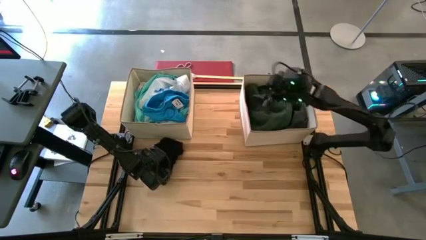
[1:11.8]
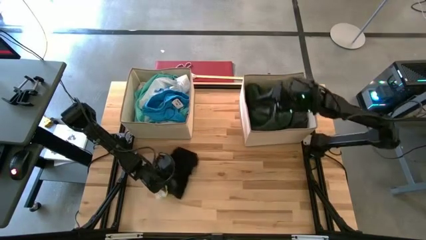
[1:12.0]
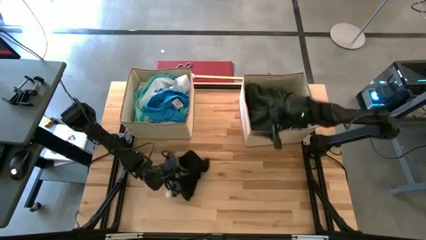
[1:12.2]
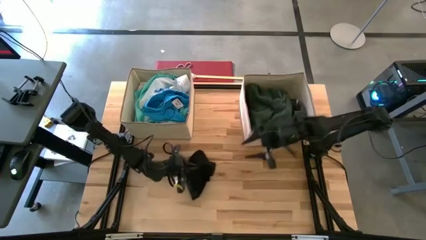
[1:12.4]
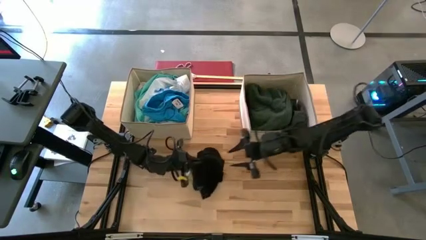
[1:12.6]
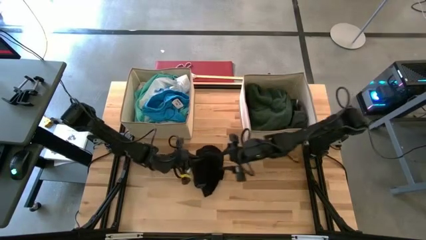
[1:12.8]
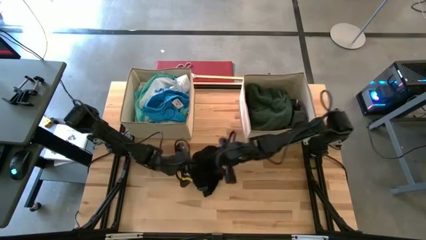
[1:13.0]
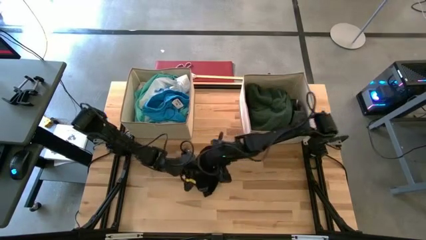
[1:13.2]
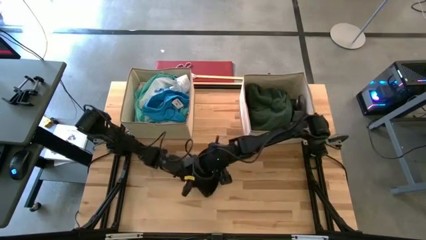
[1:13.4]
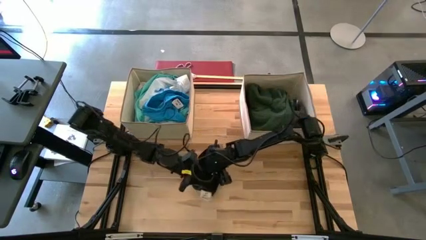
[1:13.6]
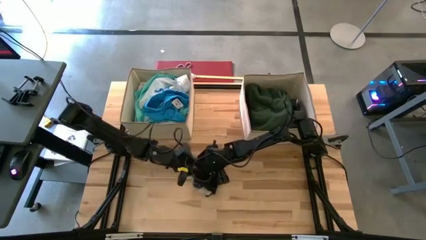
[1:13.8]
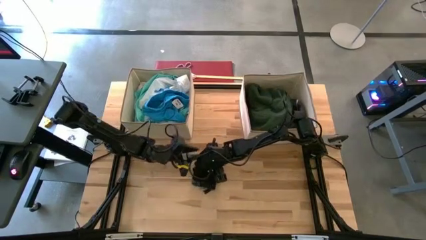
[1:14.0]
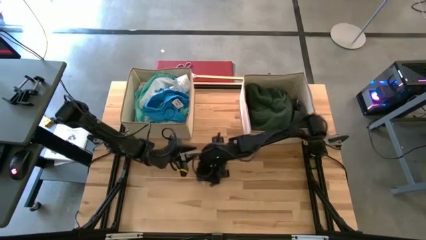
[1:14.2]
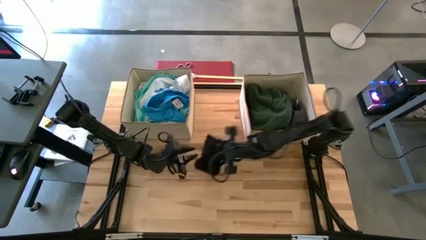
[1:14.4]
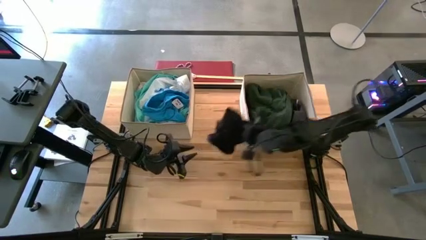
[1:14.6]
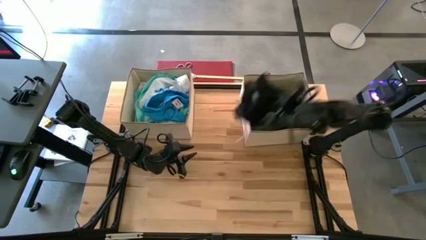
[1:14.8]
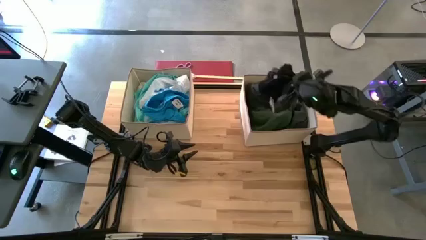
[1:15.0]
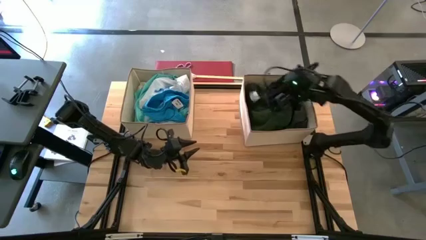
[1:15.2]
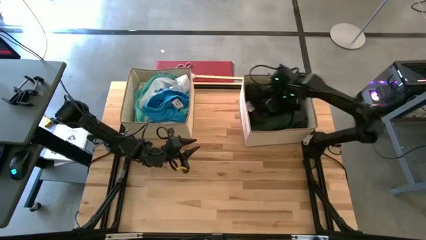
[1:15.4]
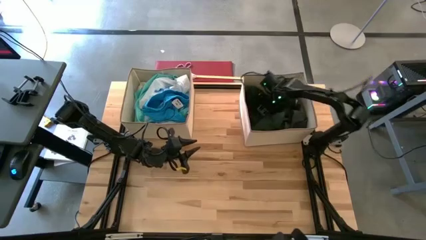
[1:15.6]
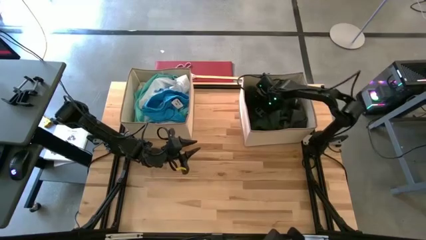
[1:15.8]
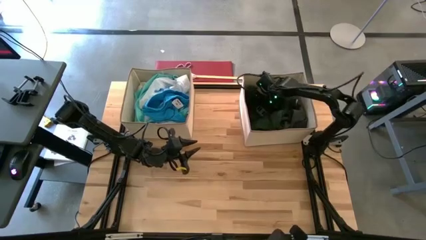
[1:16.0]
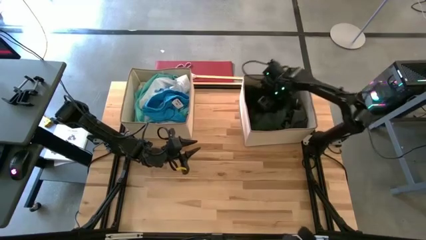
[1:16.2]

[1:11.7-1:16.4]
Task: Sort clothes
Put the black boxer into the right laundry organizer

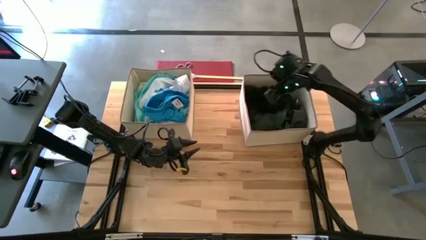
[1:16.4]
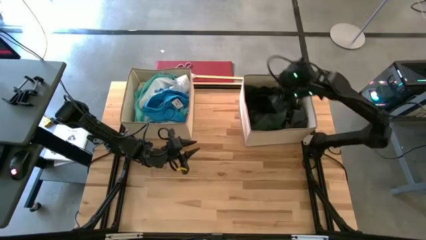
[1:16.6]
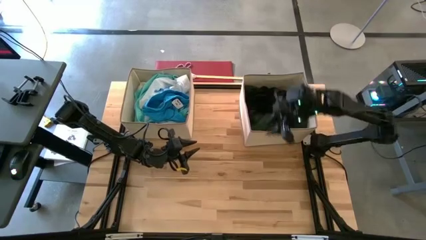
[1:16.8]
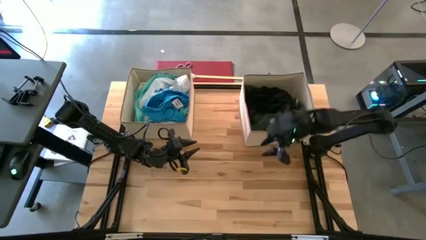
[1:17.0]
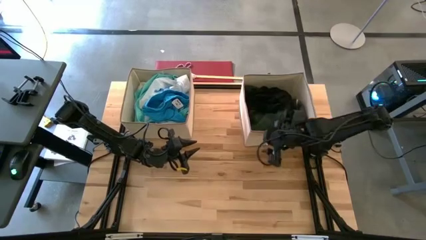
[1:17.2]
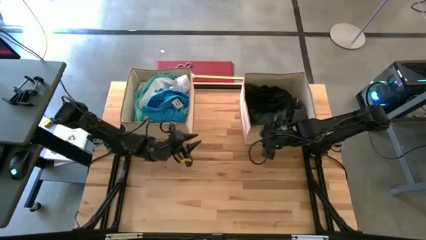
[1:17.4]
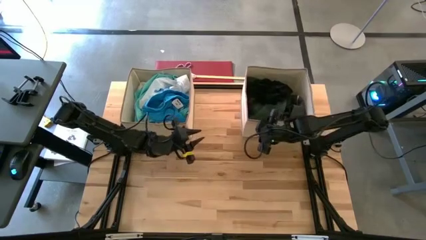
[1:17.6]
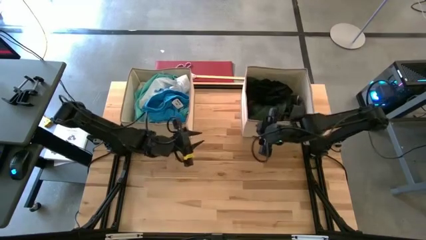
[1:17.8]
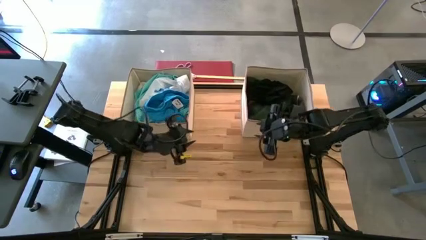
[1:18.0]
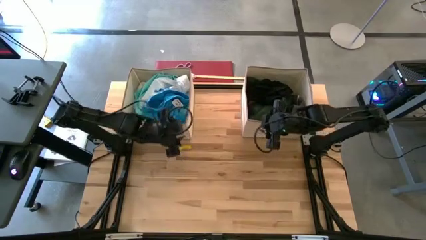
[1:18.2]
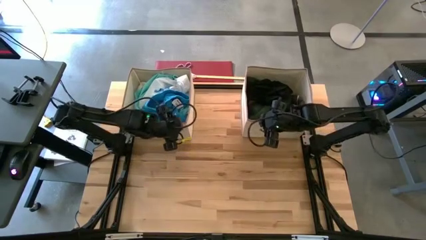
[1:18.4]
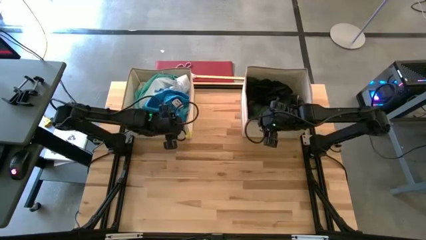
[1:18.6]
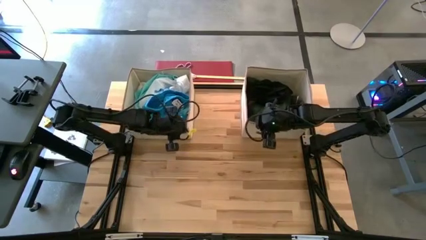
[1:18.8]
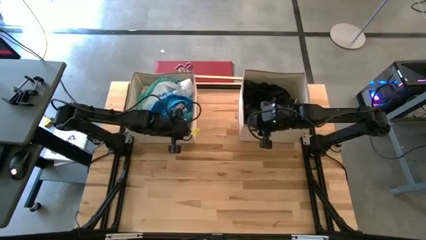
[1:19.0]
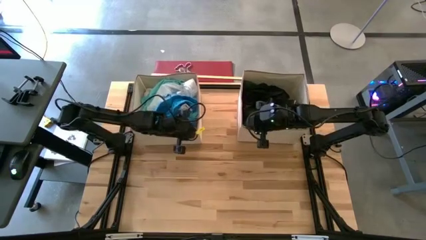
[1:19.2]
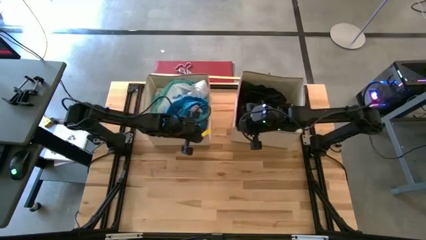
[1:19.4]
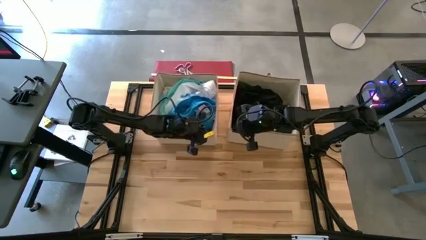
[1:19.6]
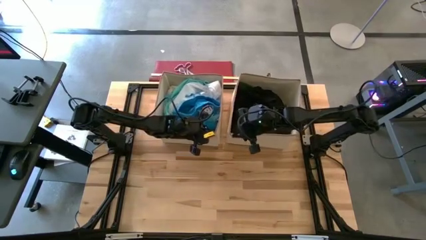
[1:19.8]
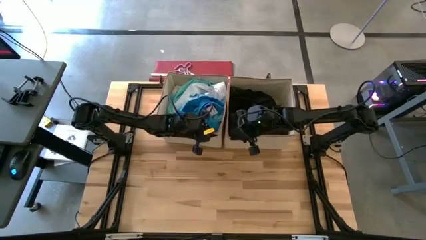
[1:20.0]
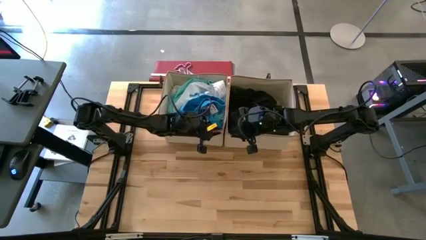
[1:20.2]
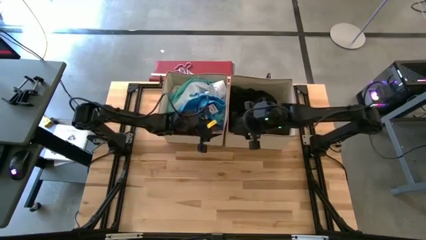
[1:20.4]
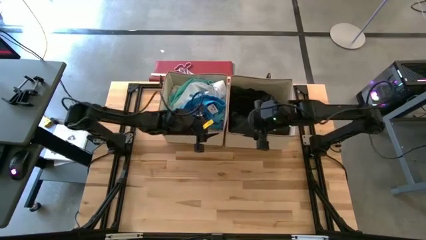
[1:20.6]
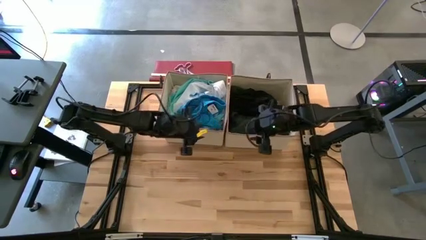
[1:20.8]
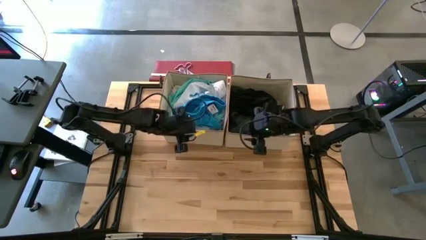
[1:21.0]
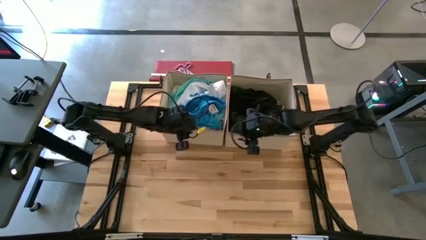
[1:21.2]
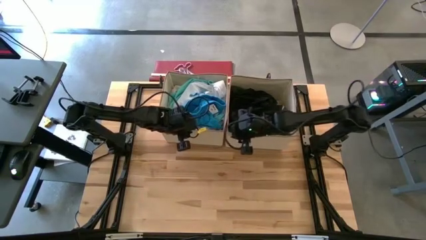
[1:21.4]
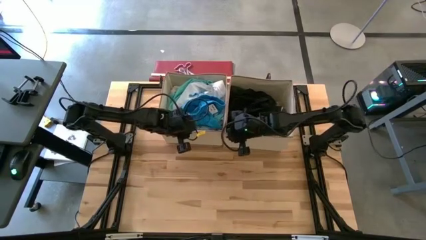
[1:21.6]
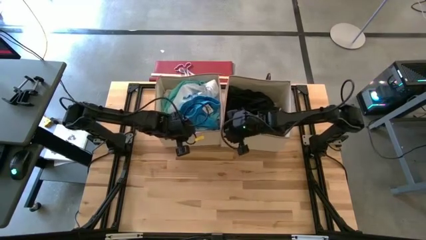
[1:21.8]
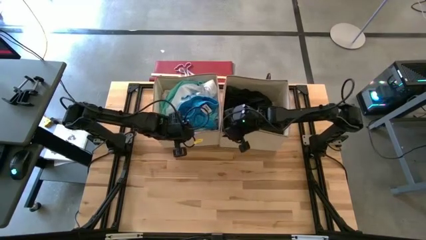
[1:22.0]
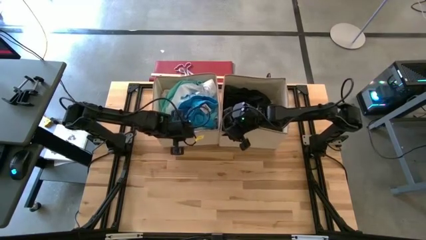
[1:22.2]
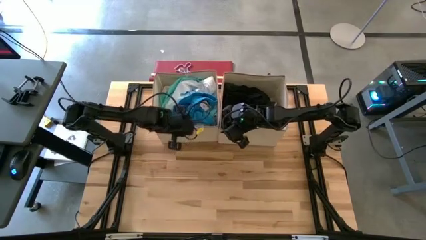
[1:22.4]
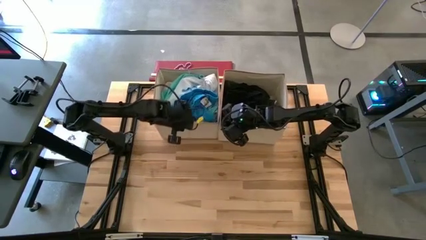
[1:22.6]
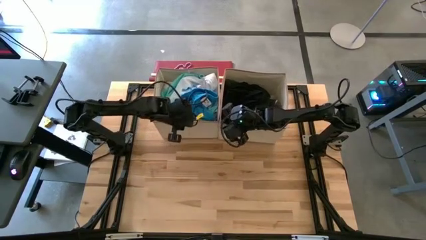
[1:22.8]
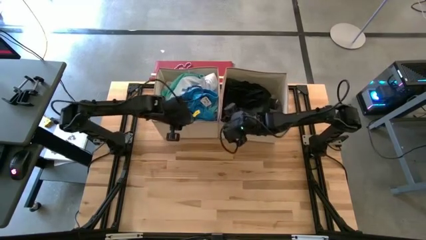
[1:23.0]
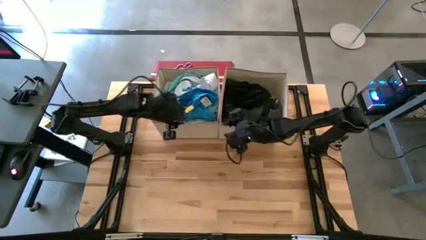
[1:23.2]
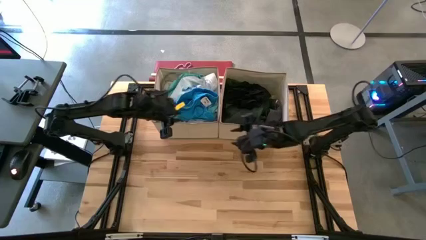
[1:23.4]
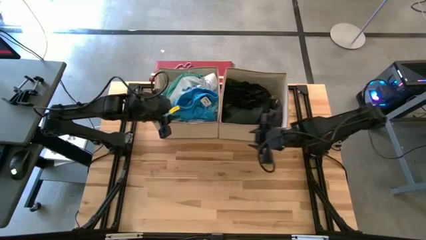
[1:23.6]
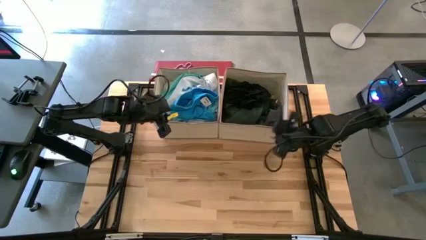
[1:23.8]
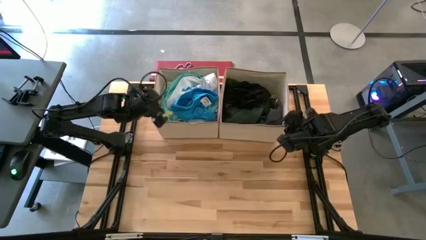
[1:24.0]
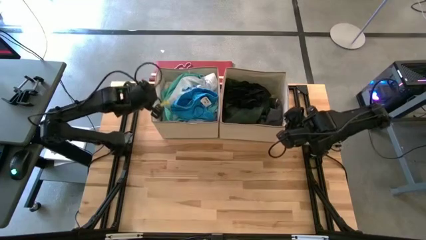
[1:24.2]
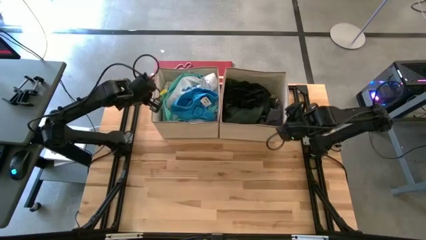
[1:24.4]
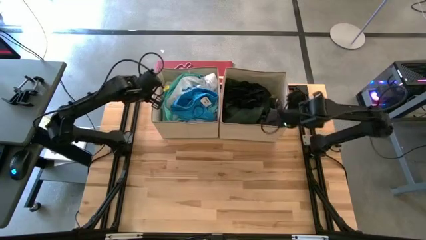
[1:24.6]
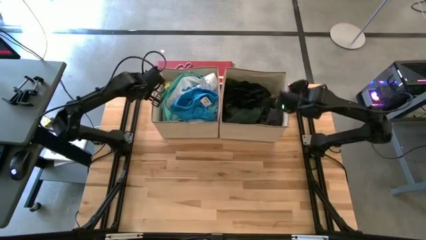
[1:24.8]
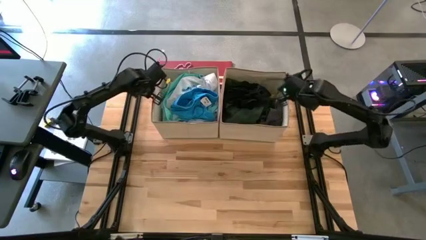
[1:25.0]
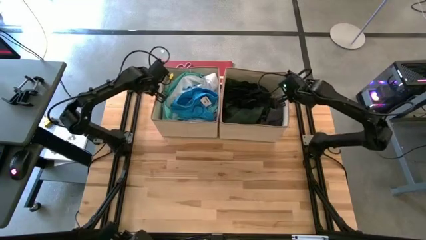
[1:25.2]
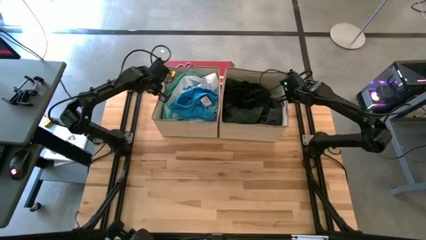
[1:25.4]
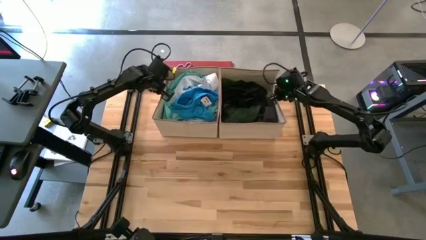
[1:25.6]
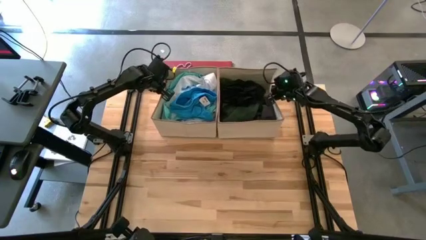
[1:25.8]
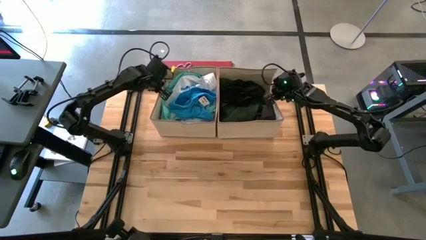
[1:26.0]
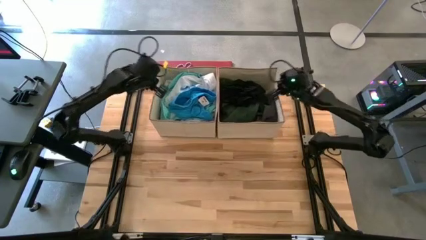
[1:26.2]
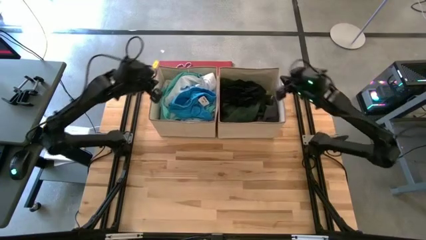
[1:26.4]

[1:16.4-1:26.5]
Adjust the laundry organizers on the table

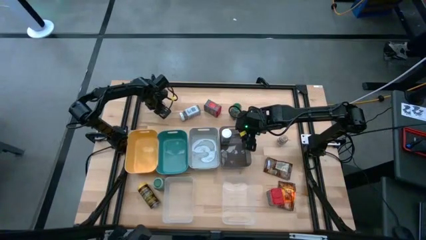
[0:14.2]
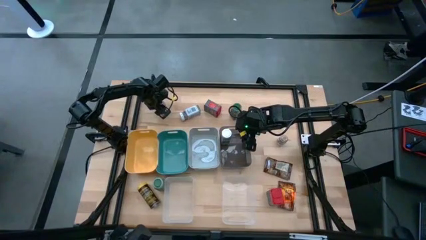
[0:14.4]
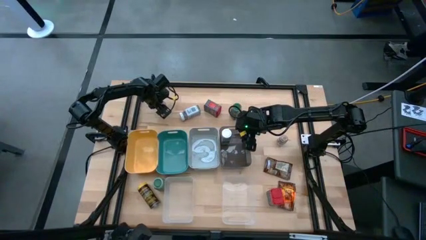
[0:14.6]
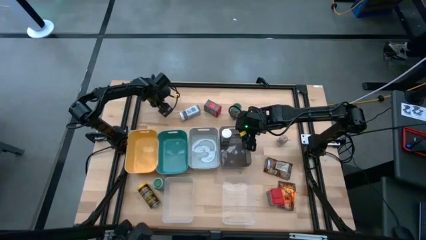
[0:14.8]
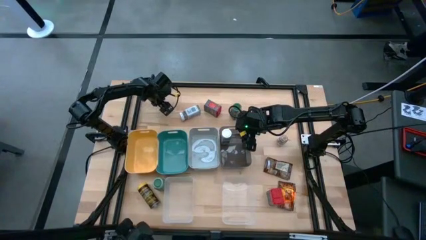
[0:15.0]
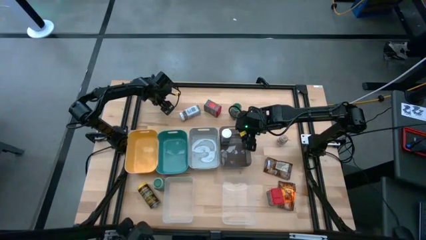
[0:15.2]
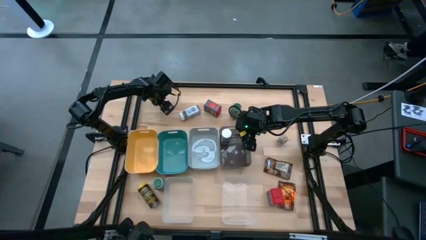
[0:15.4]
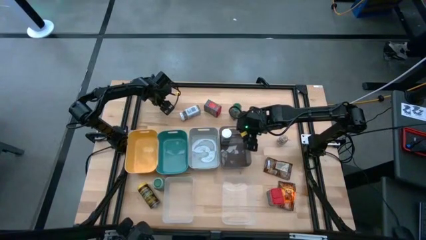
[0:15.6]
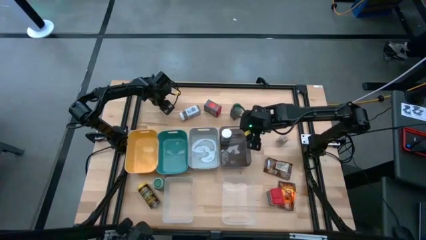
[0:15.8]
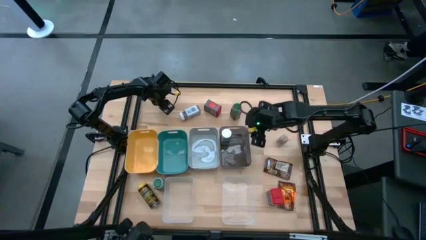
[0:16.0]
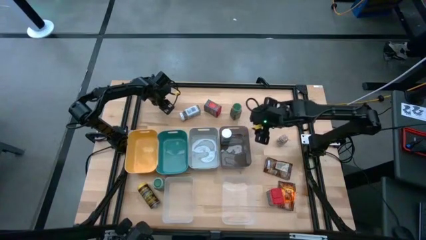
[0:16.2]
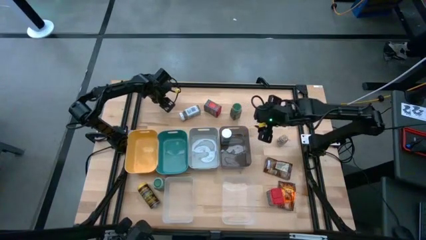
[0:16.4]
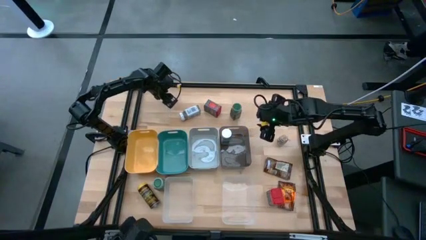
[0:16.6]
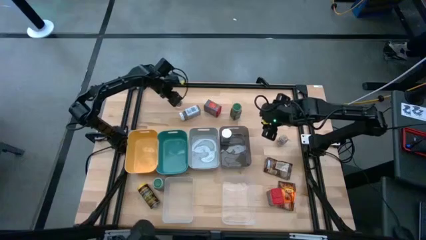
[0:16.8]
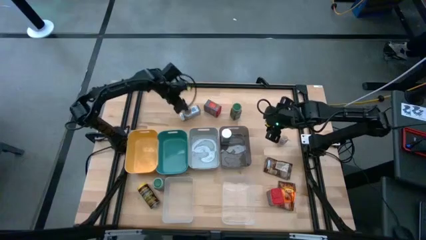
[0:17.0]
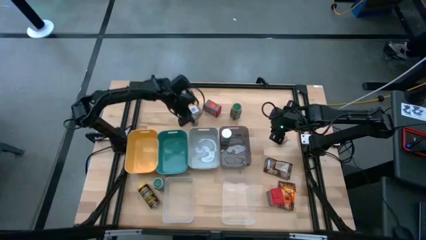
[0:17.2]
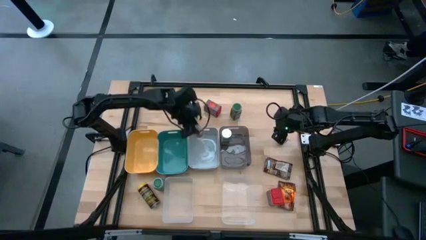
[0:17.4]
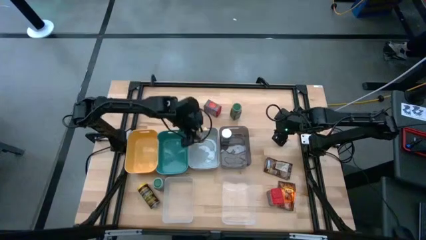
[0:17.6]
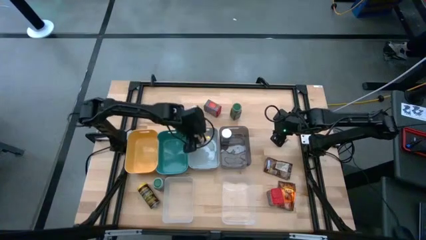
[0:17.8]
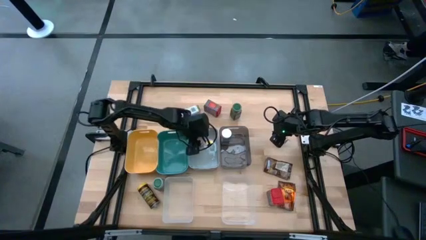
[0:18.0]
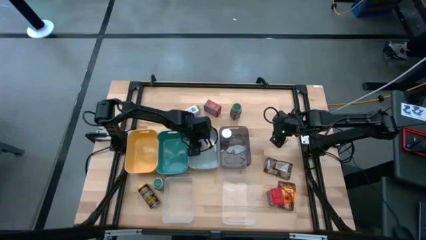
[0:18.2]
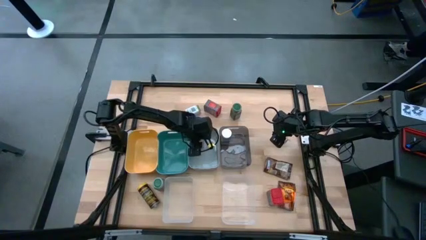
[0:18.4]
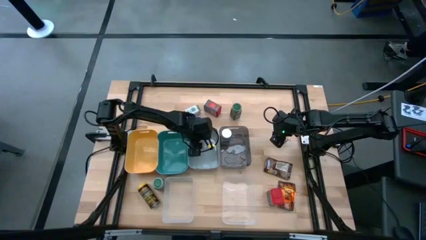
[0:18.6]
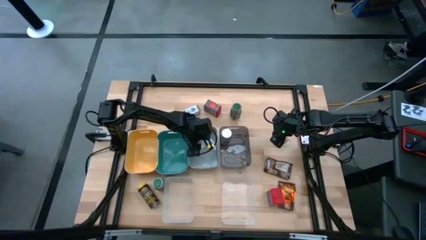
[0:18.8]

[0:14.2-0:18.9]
Task: Sort spices by type
Put the left brown seasoning bottle into the gray bin
